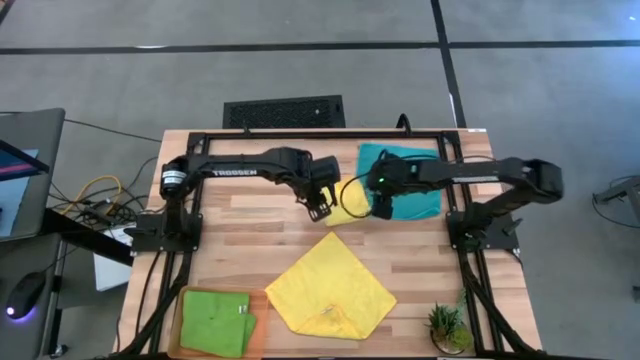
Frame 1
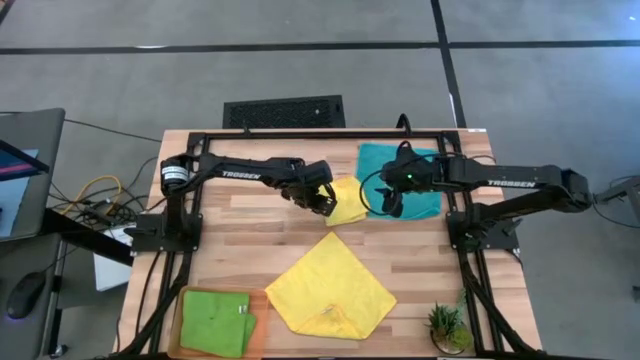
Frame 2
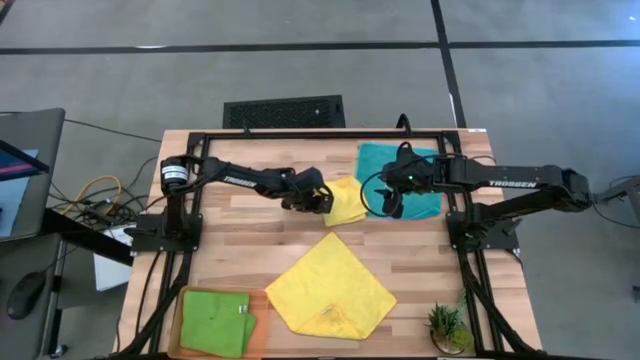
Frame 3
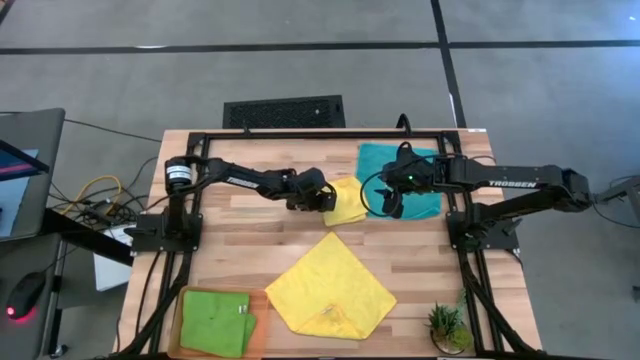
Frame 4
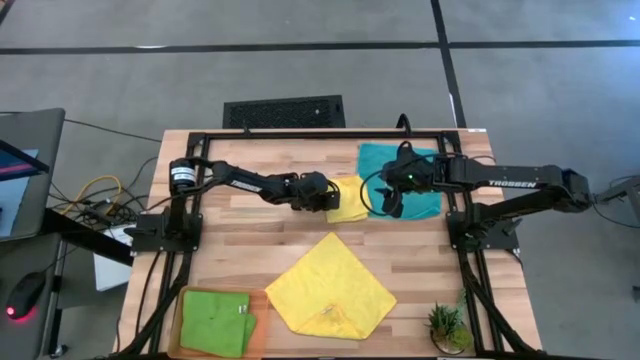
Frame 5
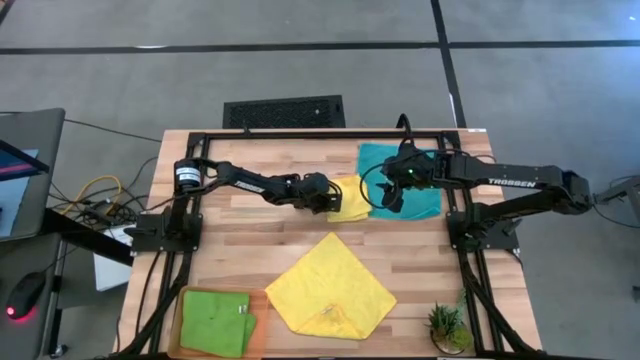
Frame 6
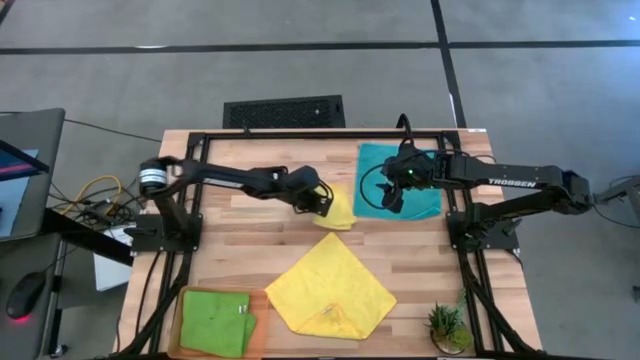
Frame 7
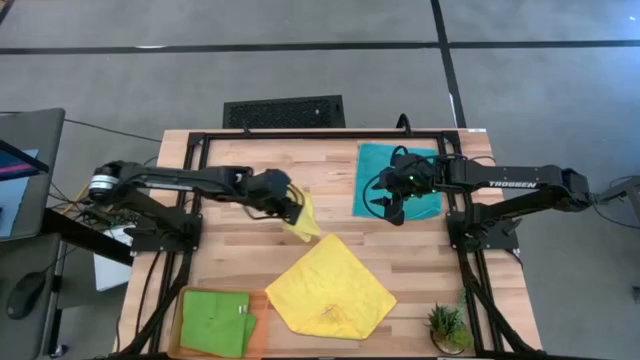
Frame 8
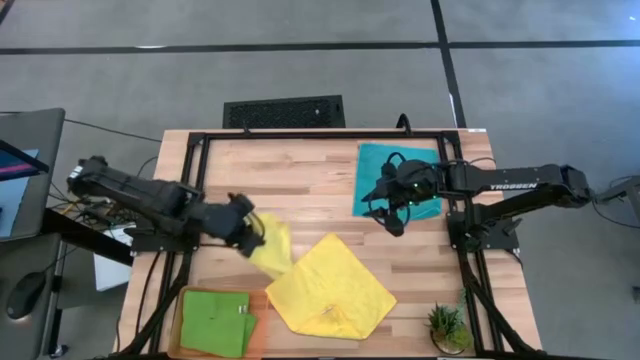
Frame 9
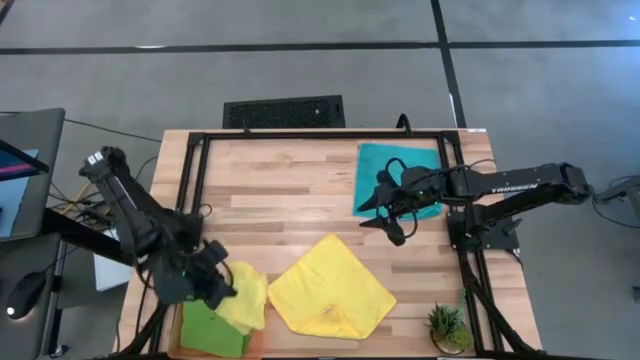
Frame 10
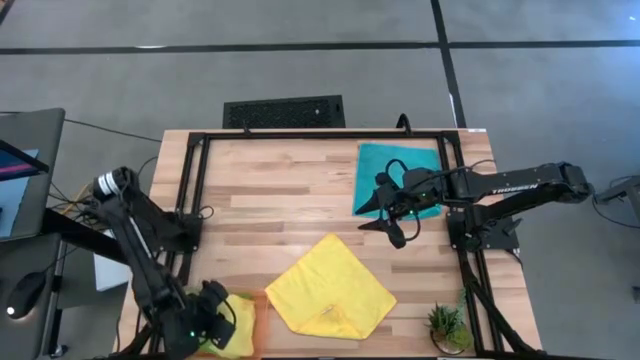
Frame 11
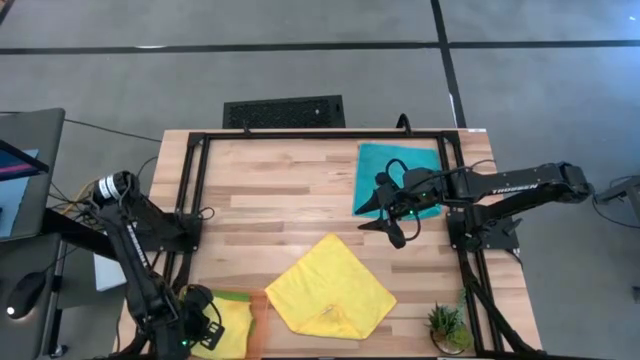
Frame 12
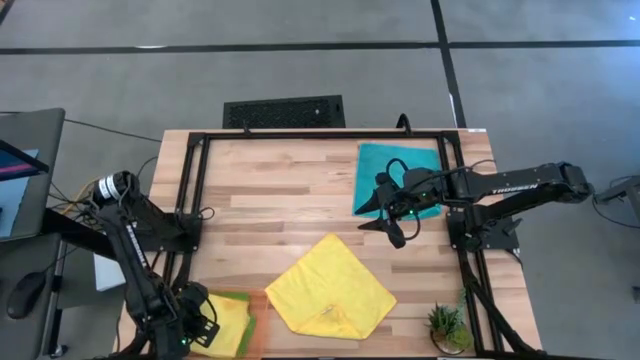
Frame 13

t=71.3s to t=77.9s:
Task: Fold microfiber towels
Put the yellow microfiber towel into the bin

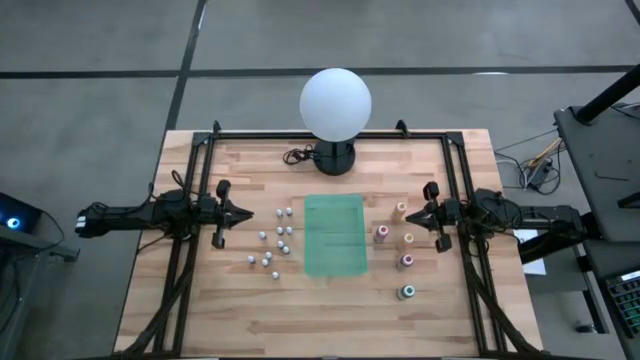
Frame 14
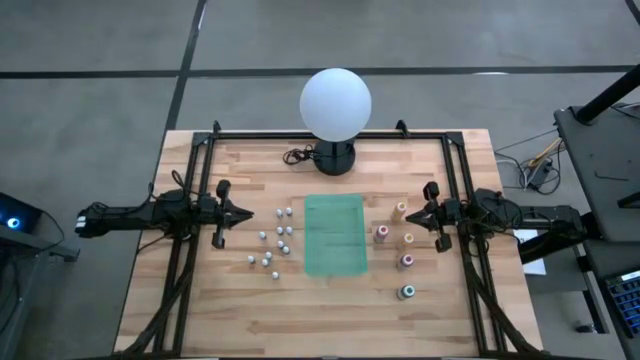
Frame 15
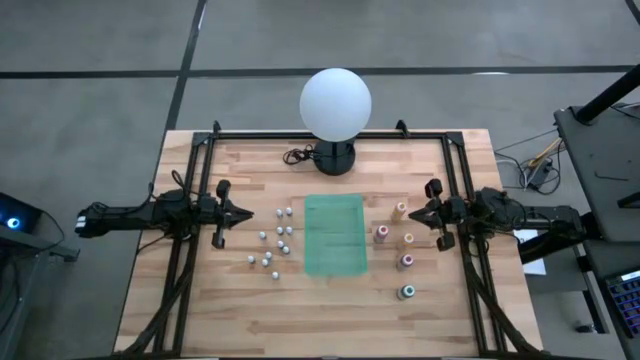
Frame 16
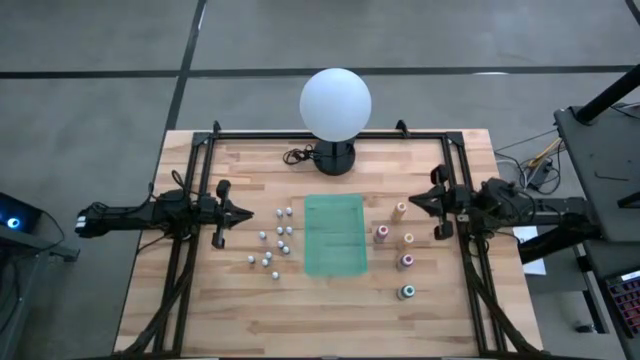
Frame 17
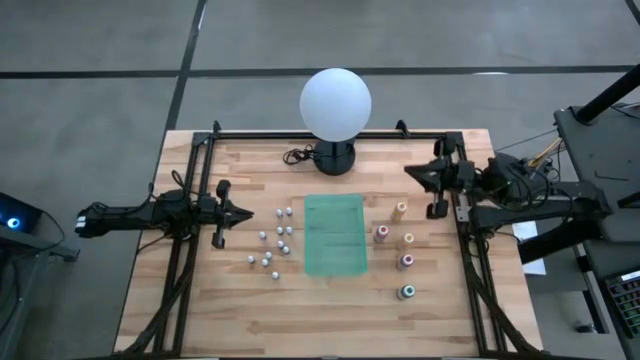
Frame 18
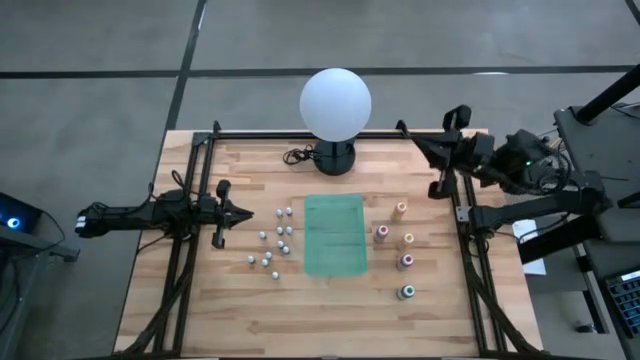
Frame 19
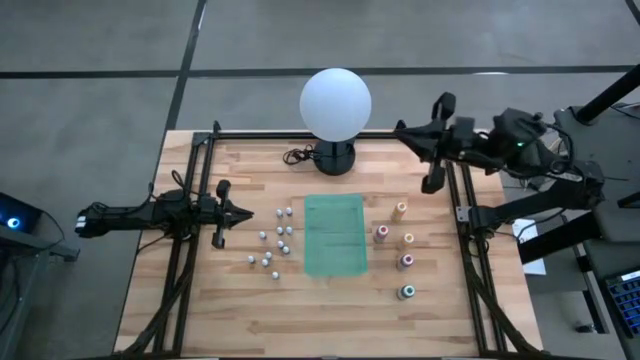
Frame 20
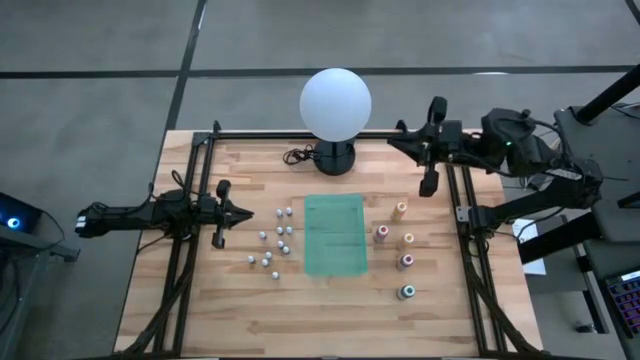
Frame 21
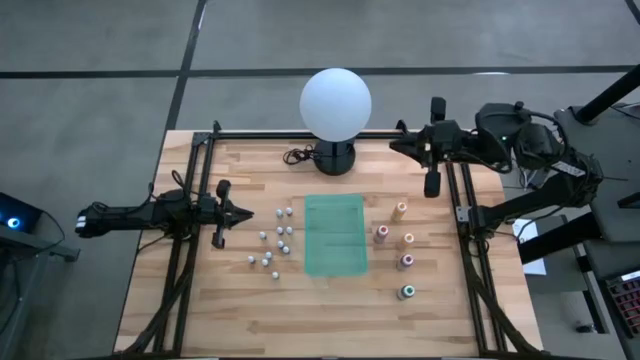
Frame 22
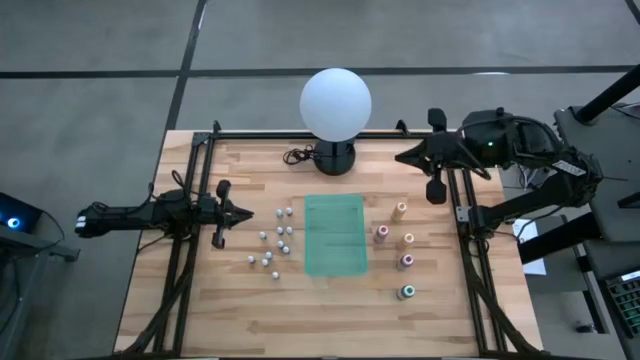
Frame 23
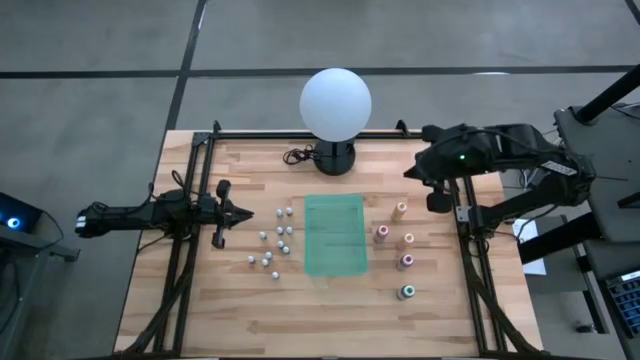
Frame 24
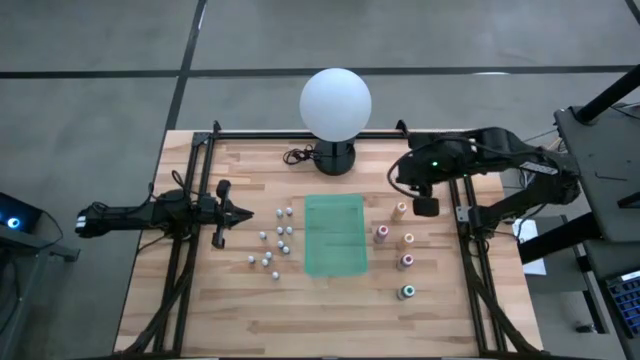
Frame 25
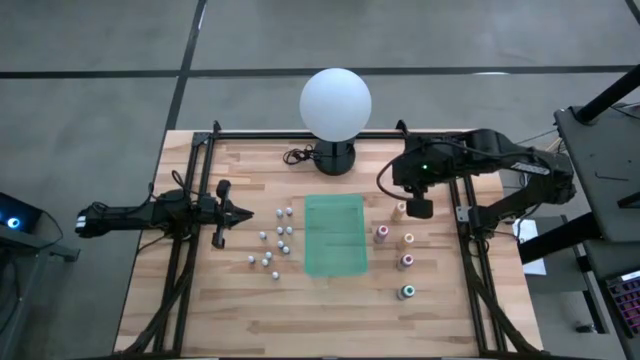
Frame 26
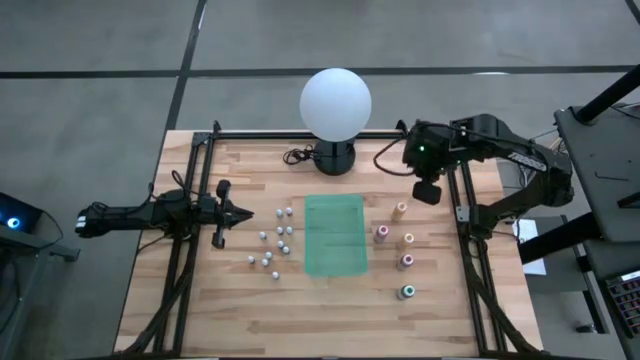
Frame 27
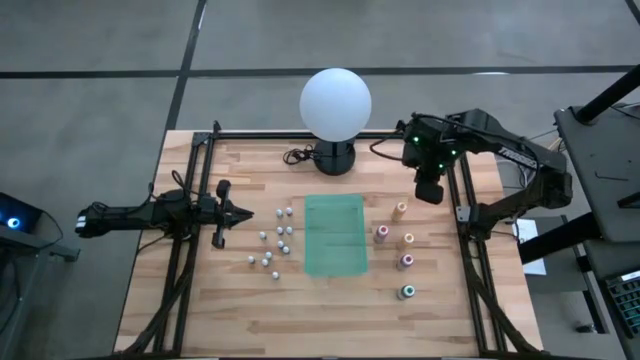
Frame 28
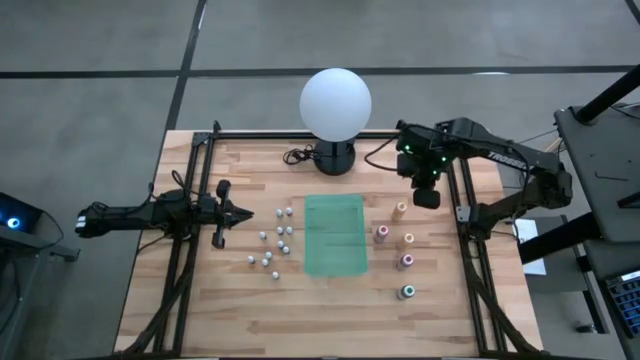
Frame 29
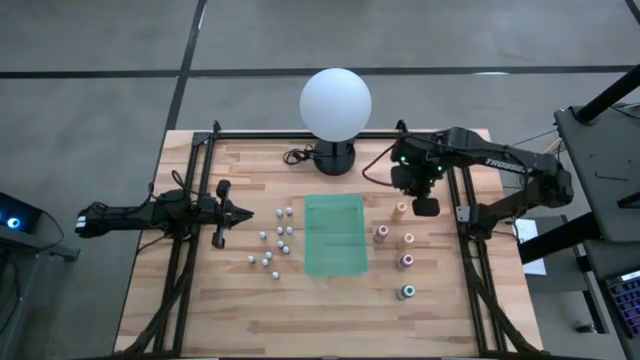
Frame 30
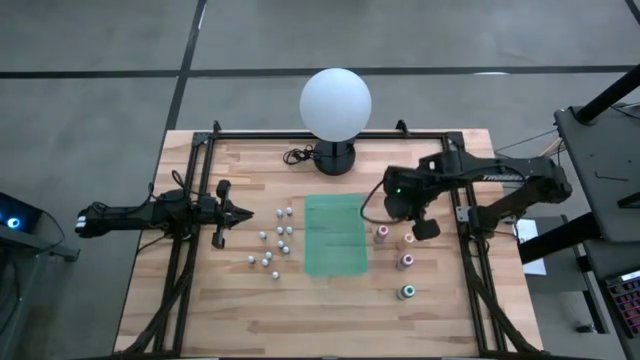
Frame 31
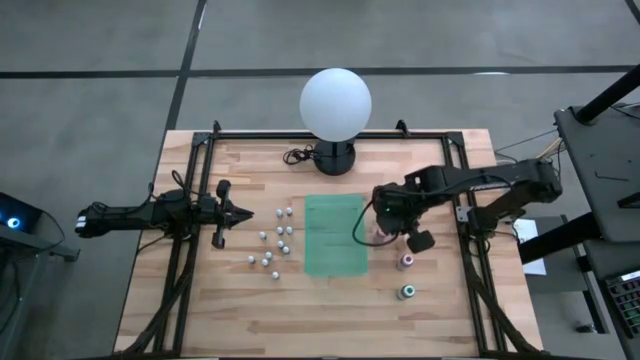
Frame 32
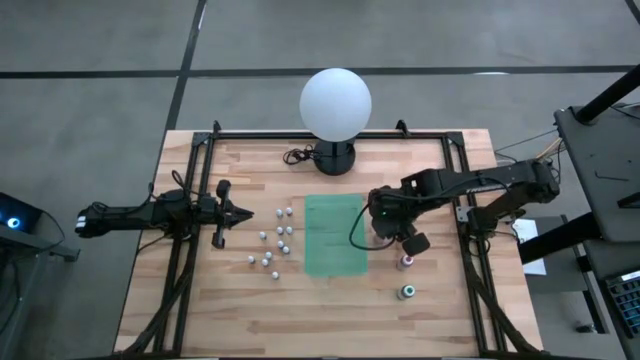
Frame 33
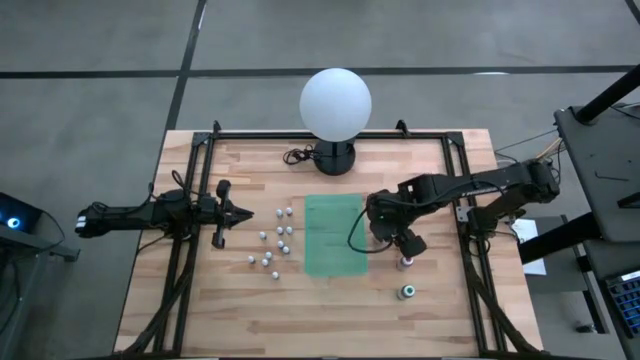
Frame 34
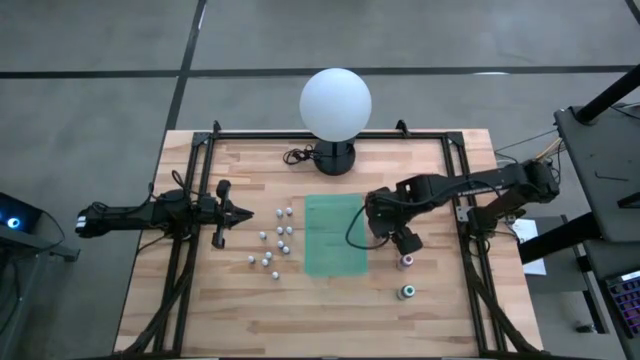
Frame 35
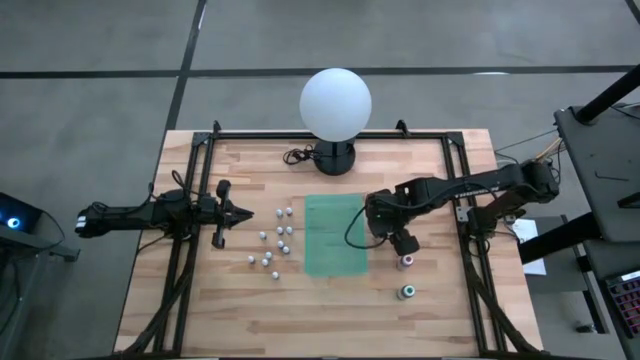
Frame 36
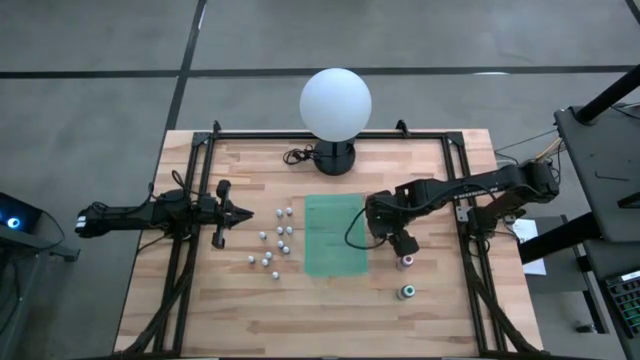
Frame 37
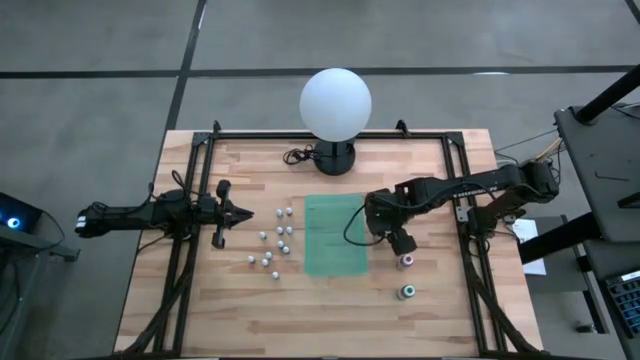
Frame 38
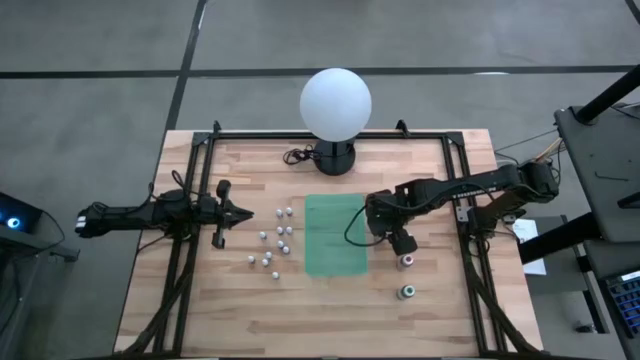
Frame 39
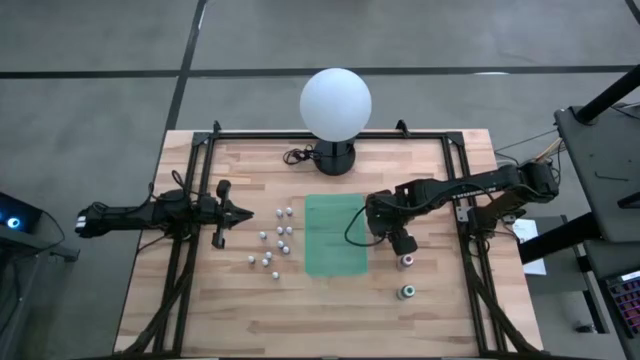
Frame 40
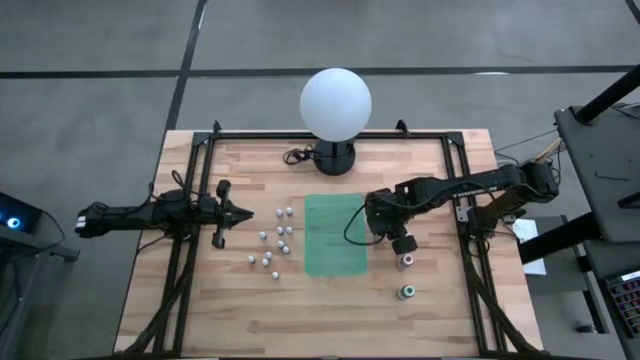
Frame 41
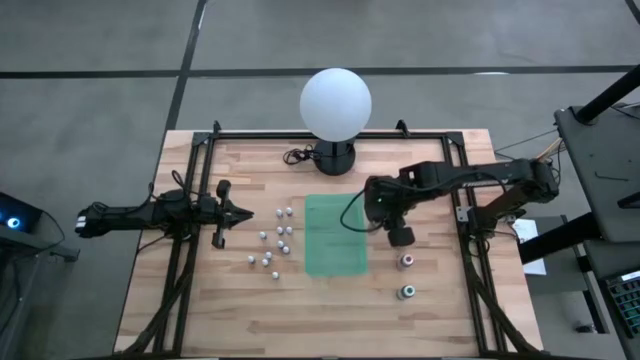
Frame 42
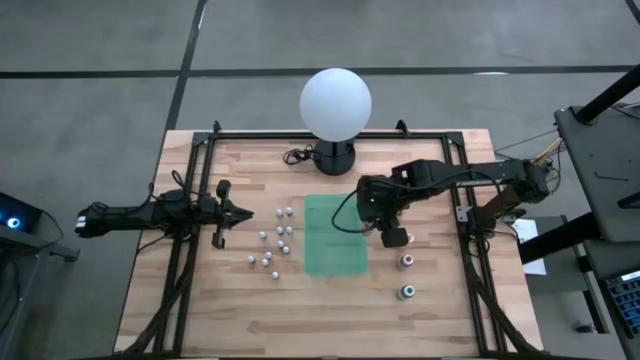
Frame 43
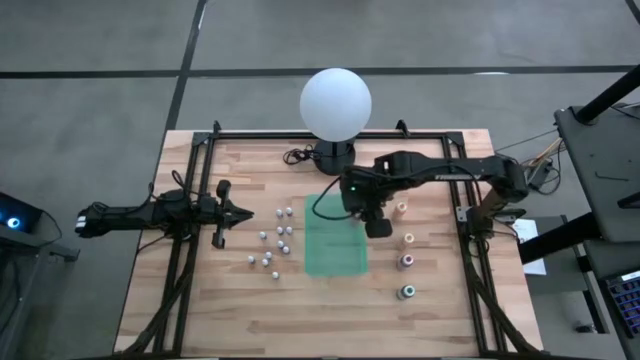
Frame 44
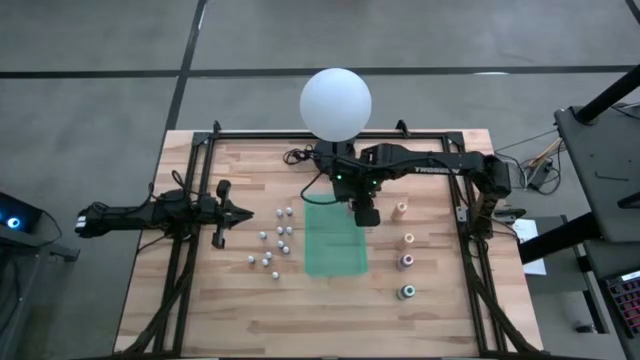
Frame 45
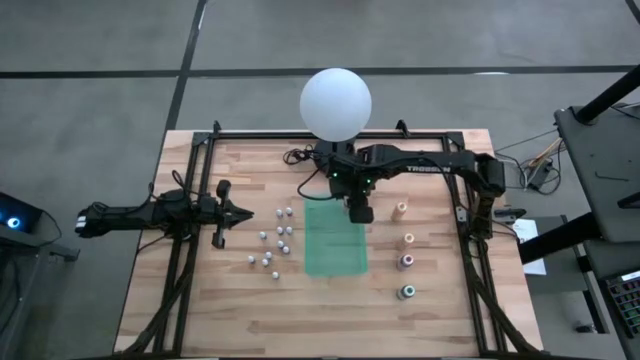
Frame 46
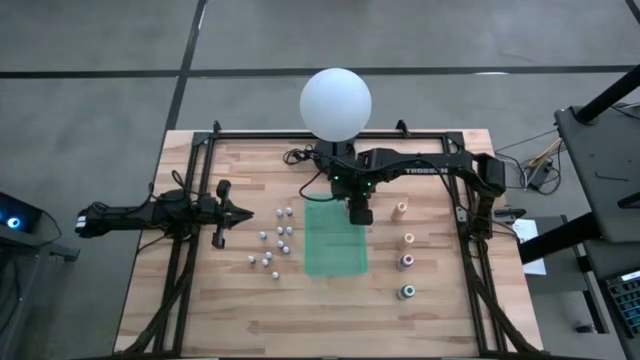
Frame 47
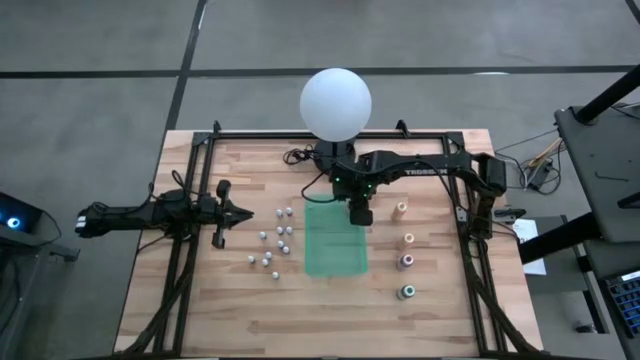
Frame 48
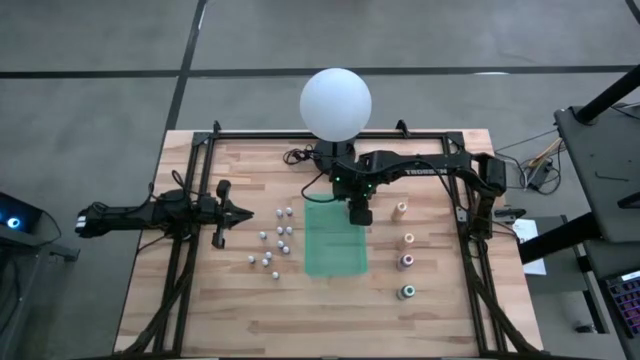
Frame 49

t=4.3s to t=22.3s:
Task: Pick & Place food coloring
Put the large orange food coloring bottle into the green bin
